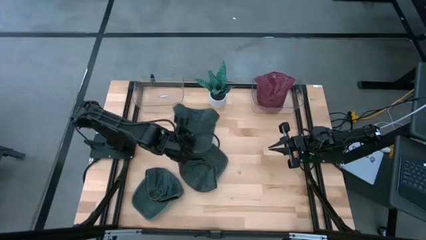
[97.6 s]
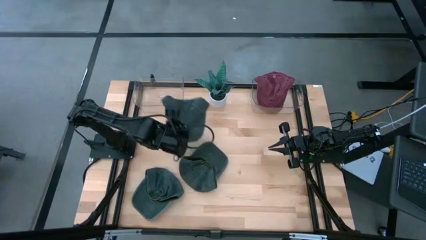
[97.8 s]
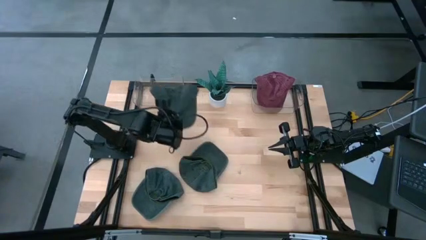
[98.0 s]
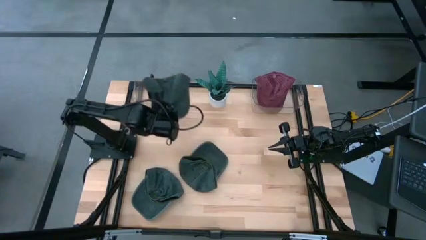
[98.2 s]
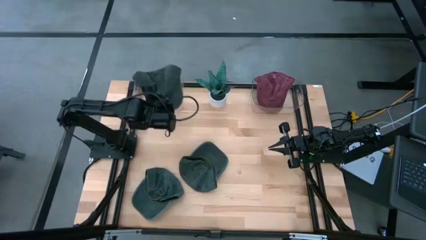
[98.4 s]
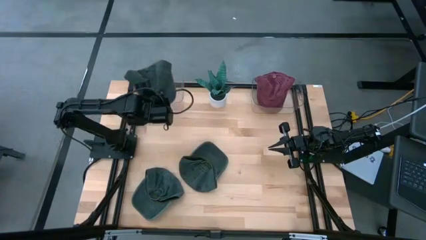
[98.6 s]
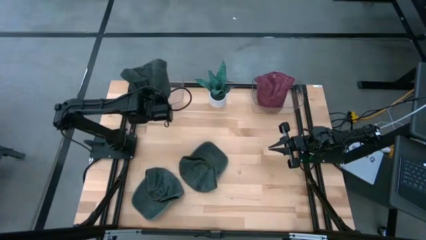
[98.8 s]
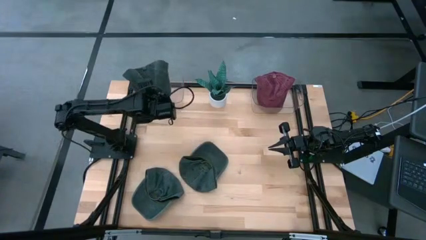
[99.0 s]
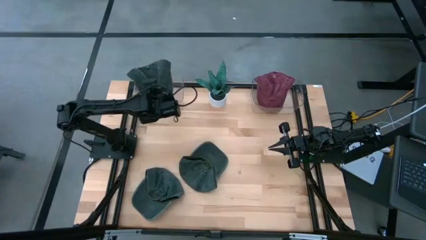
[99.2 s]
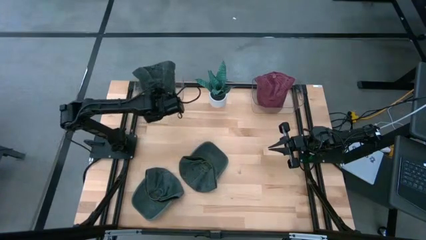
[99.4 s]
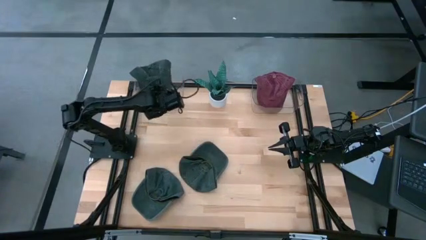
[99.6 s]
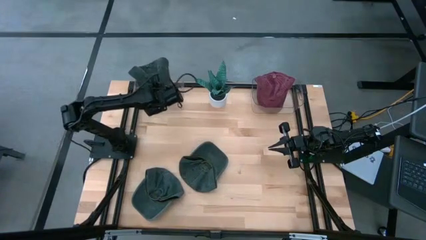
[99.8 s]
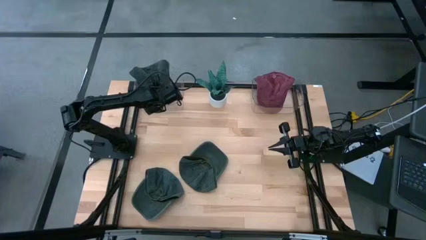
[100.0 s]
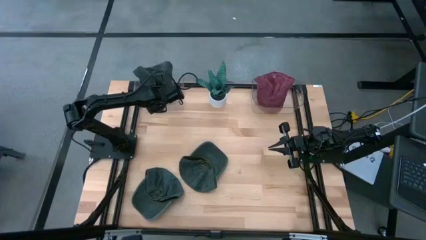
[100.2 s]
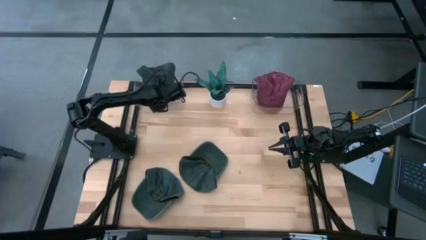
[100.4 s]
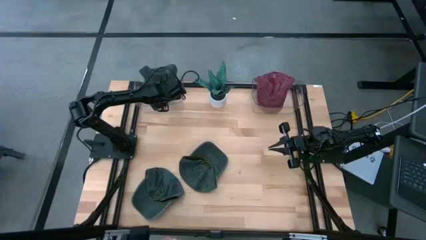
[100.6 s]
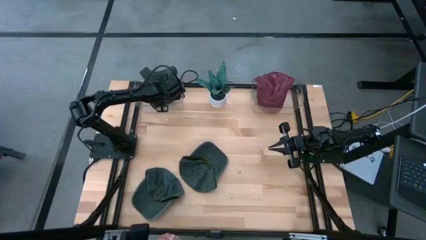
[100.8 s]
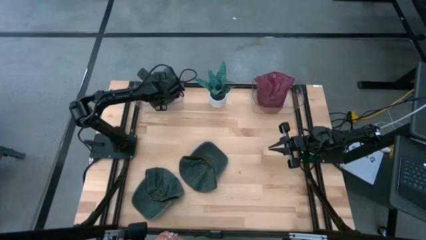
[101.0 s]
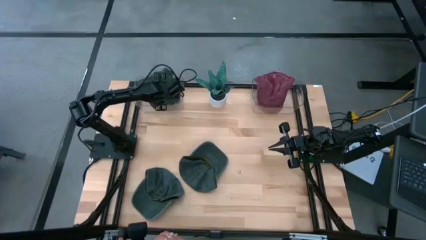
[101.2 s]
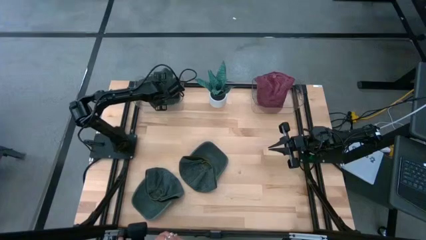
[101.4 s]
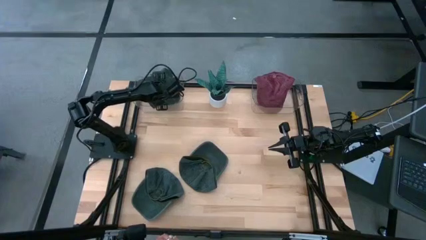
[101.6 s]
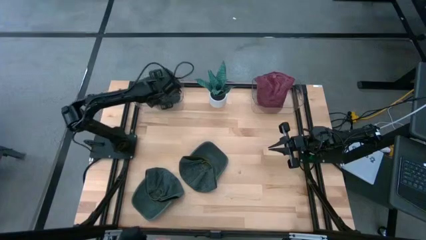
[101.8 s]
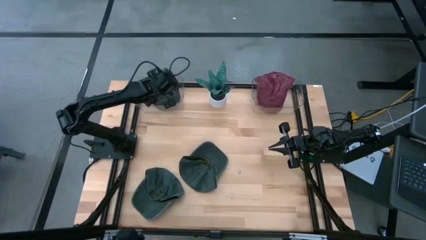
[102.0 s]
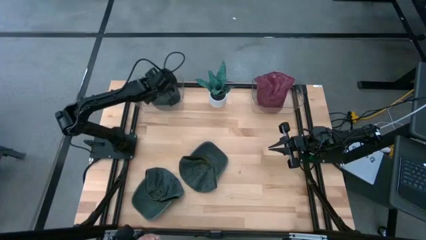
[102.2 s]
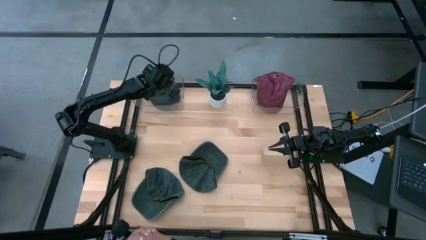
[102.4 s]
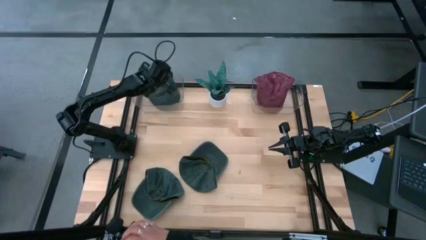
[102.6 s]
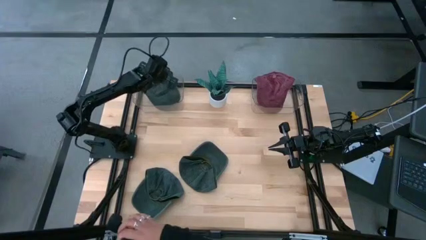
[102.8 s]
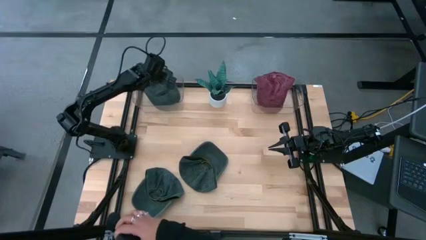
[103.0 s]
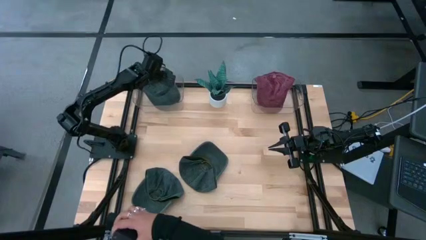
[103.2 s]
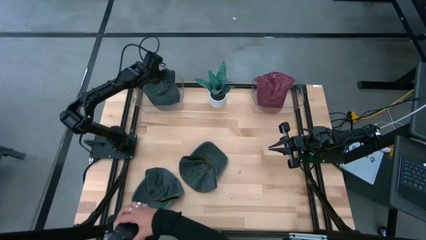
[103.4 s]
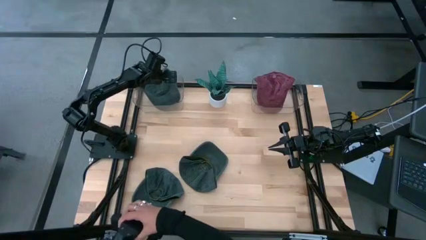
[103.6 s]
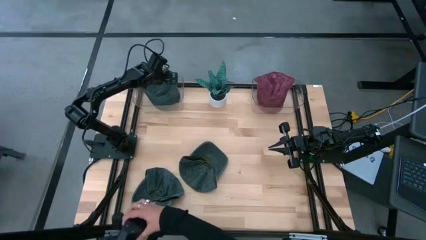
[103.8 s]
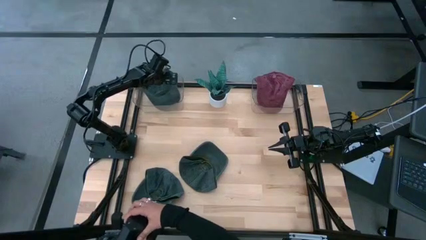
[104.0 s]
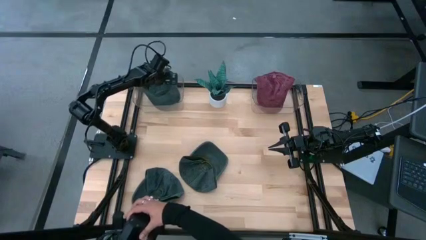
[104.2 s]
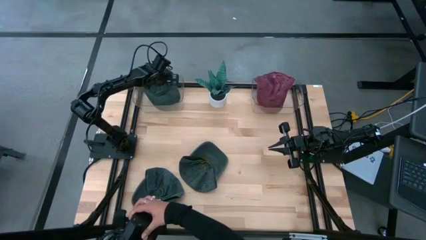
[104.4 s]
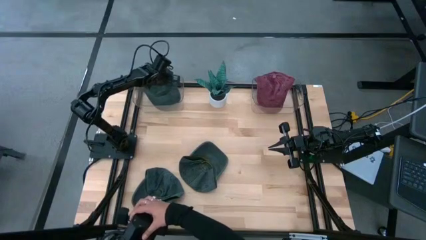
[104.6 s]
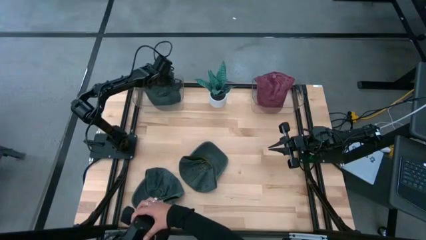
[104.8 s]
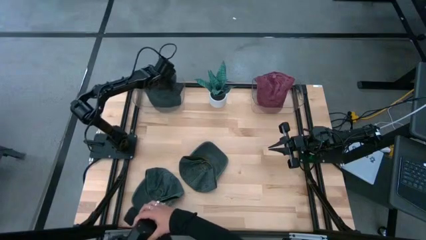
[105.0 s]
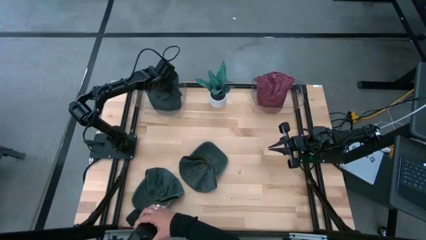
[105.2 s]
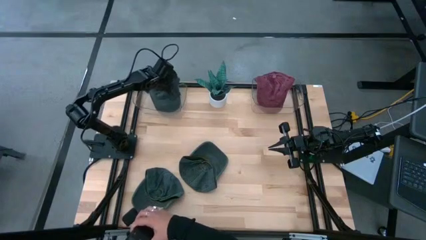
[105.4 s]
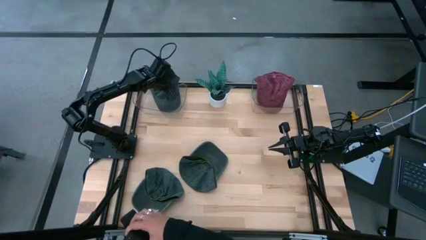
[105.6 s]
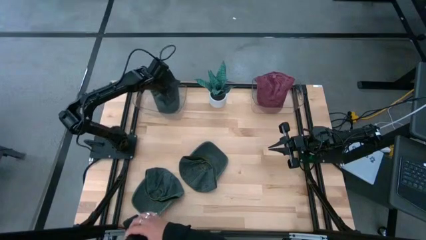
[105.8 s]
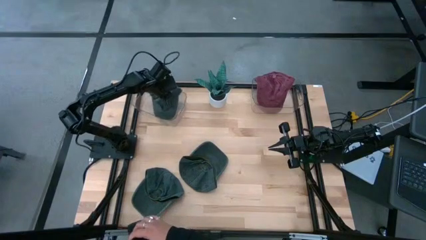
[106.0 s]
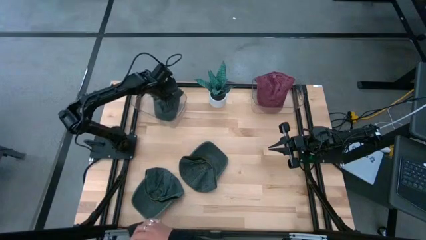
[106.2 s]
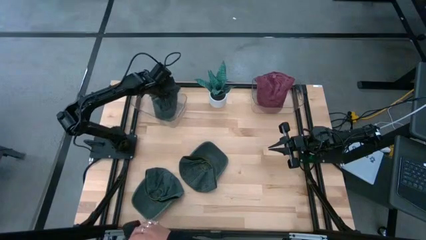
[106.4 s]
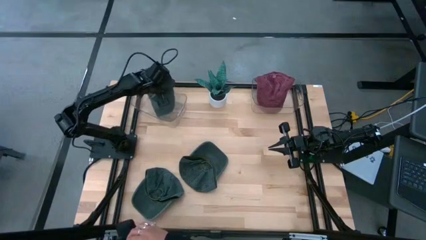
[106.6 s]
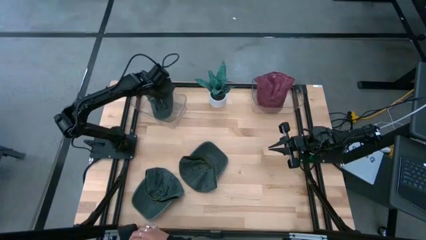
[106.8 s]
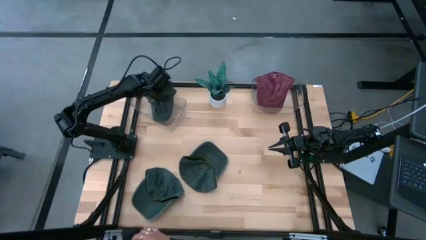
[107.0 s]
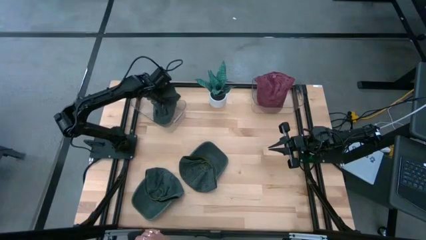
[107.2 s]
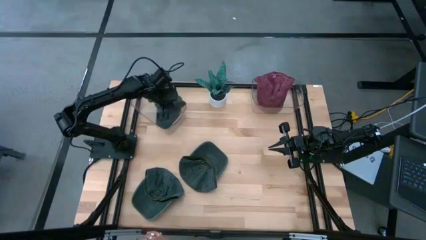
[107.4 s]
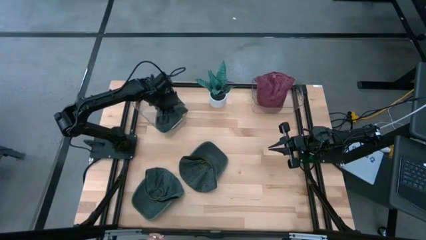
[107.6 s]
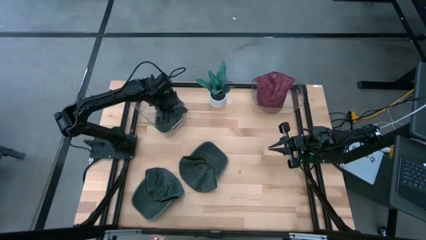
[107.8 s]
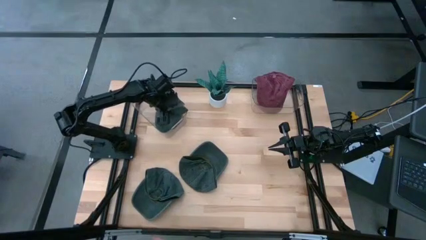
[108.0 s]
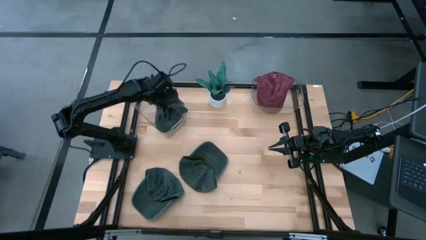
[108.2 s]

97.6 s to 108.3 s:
Task: Pick & Place hat
Put the right black cap into the left transparent bin

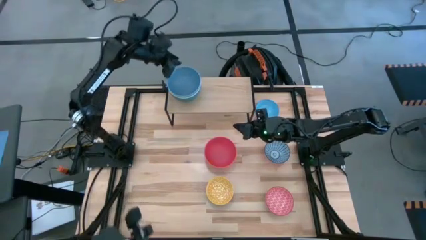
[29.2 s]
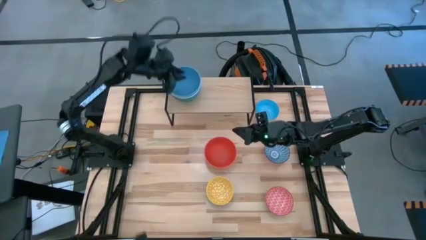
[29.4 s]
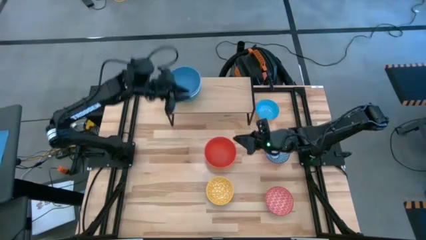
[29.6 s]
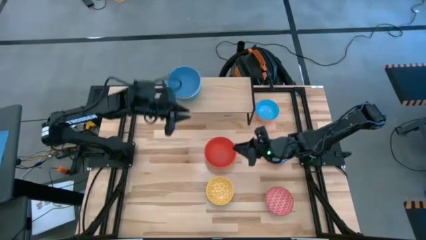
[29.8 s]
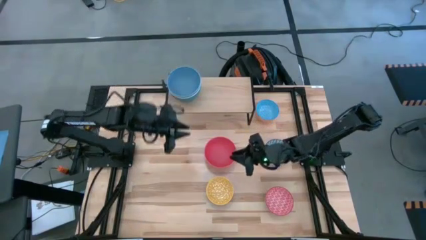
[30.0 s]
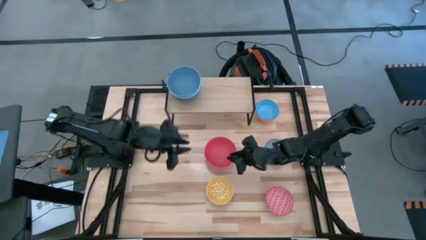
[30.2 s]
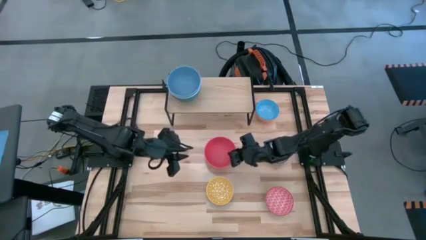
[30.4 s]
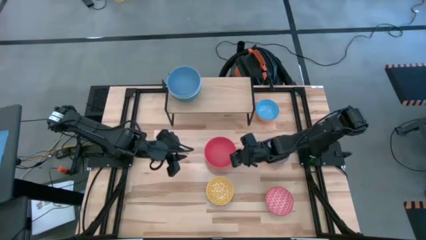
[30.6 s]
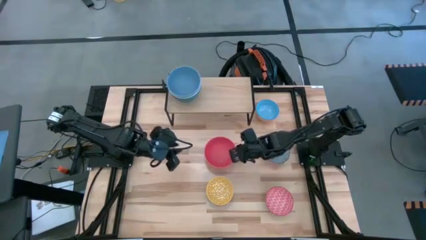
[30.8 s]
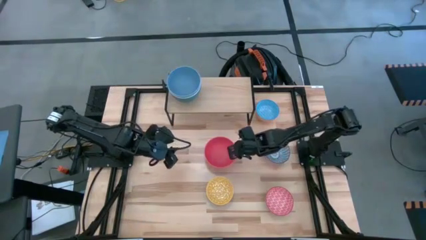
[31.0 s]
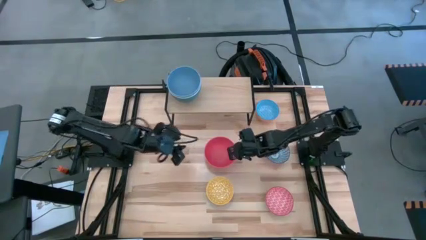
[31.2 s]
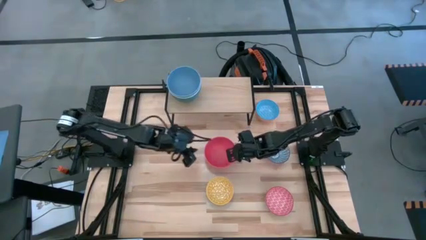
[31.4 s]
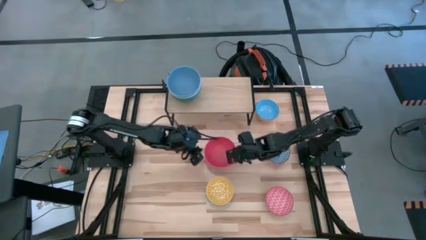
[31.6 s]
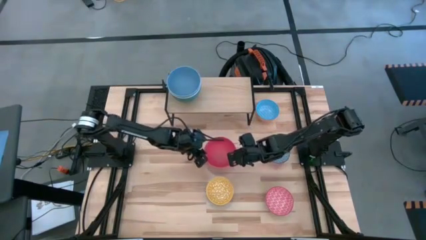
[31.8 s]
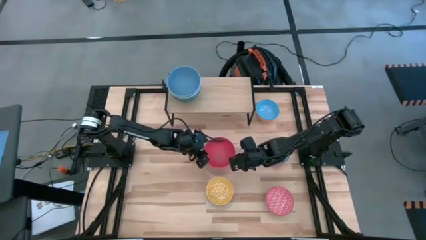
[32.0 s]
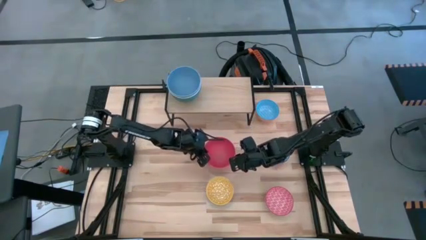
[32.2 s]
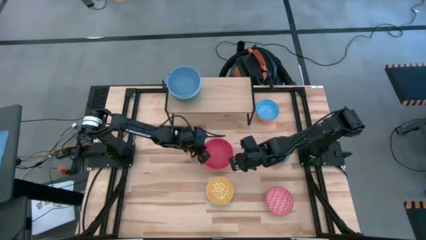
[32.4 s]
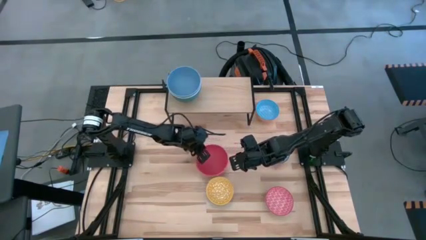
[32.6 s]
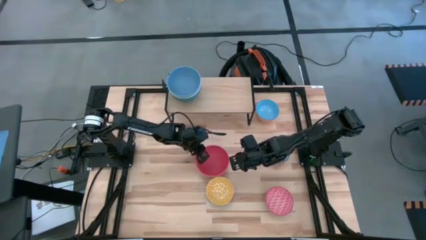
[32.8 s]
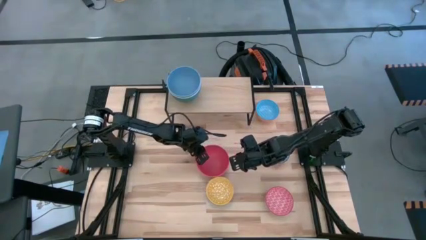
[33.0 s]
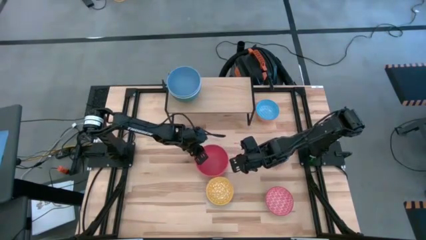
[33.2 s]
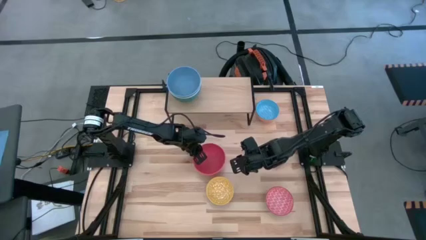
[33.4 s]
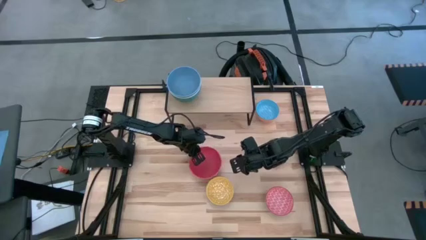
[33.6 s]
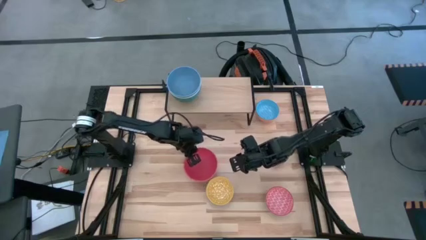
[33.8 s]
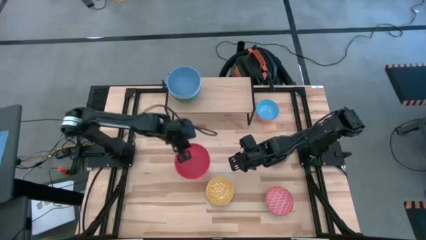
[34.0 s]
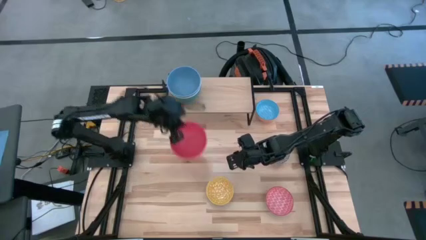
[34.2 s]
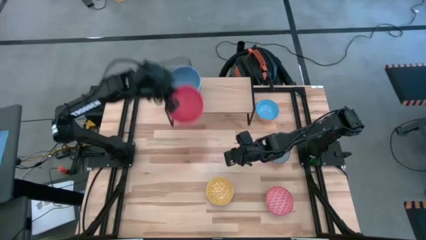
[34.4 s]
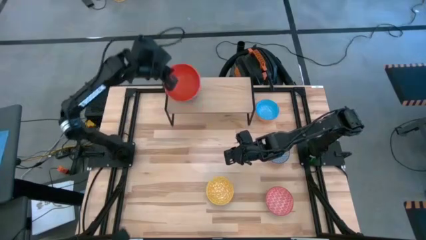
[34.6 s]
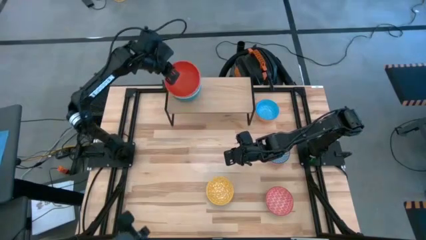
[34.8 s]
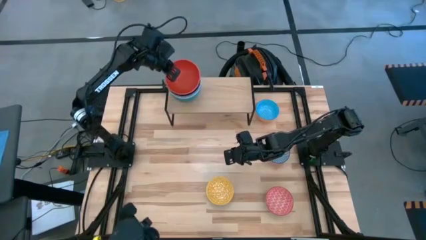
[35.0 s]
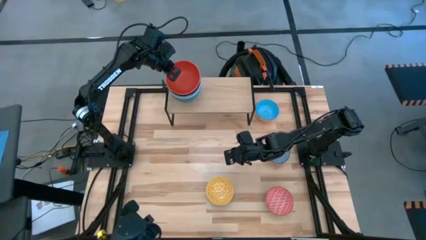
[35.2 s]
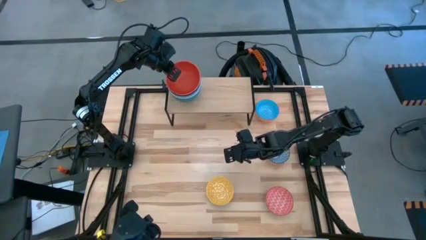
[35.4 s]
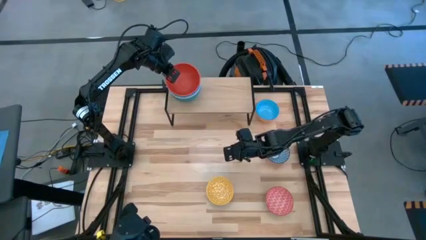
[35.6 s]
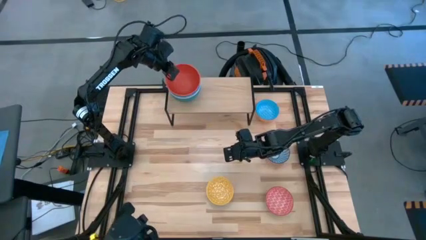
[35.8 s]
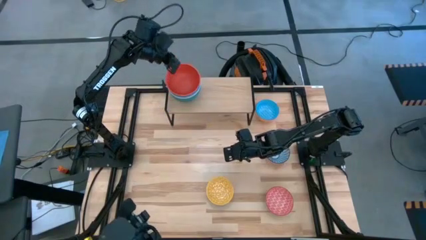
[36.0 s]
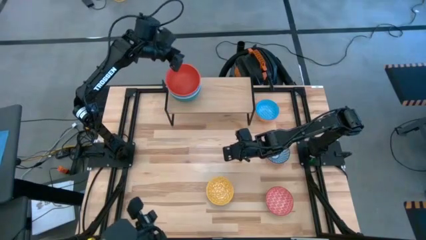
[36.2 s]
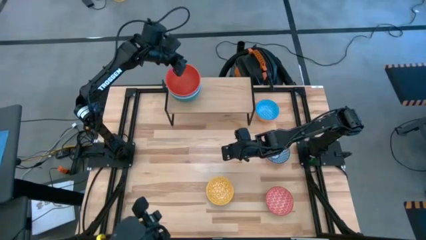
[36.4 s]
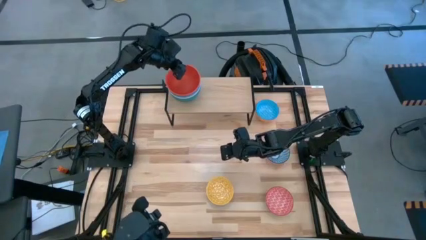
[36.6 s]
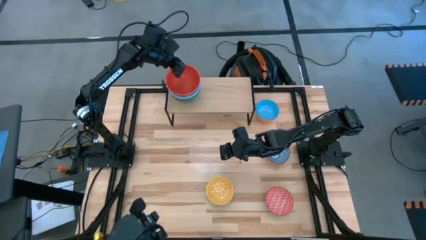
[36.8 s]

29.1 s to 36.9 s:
Task: Place and stack bowls onto a shelf
Stack the red bowl into the blue bowl
